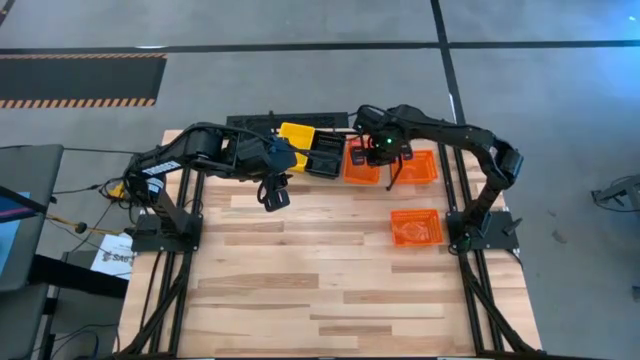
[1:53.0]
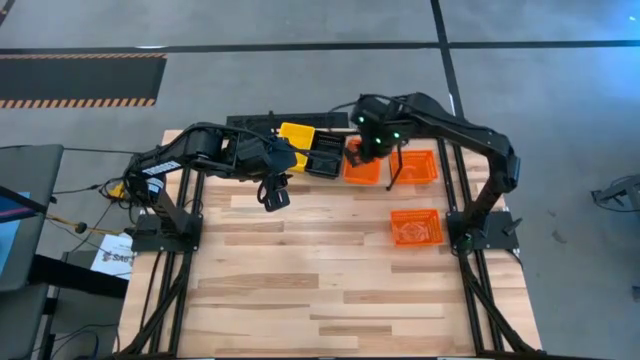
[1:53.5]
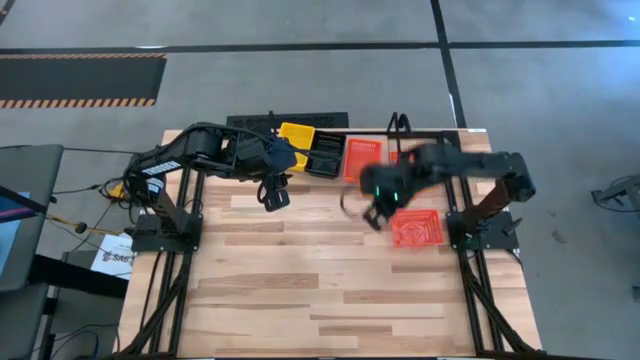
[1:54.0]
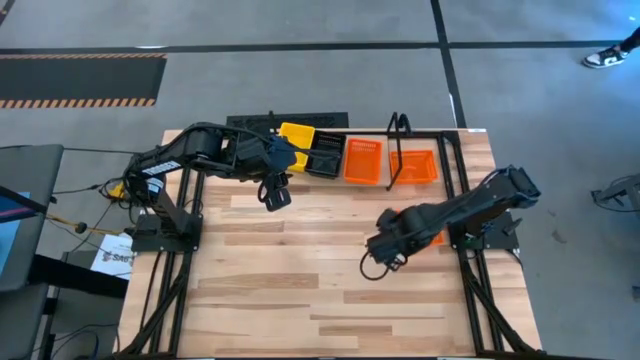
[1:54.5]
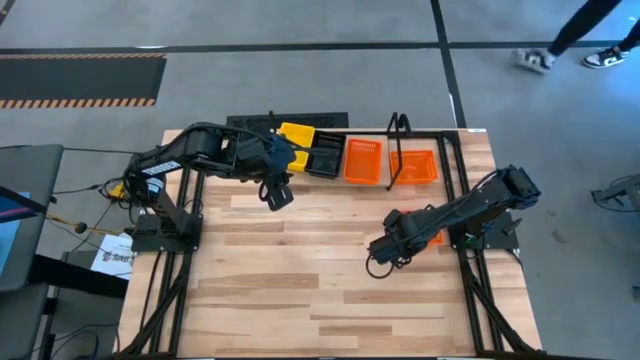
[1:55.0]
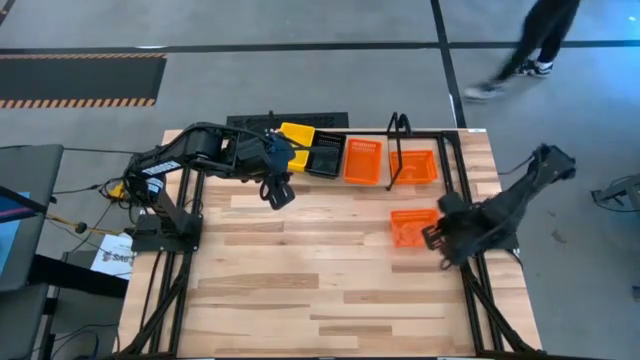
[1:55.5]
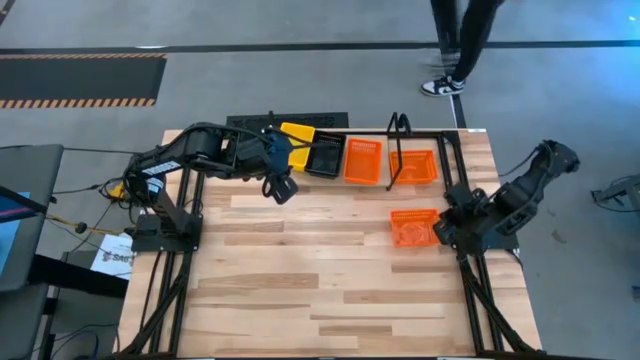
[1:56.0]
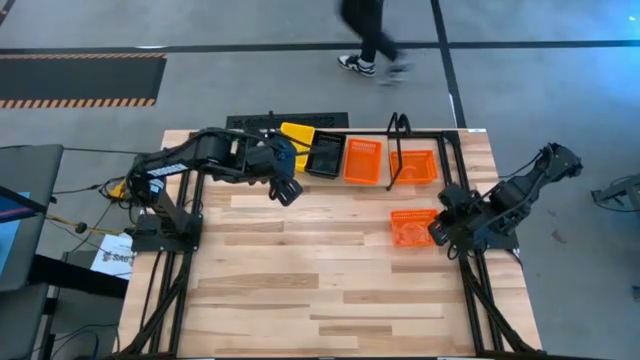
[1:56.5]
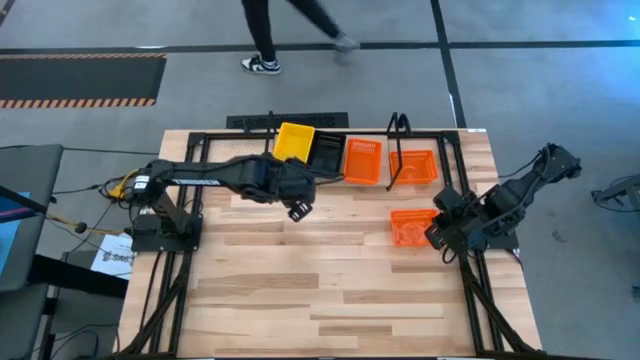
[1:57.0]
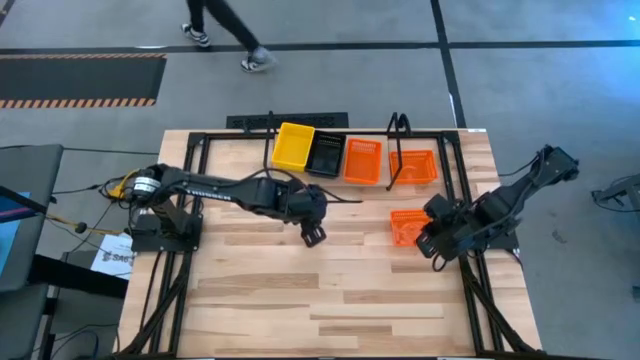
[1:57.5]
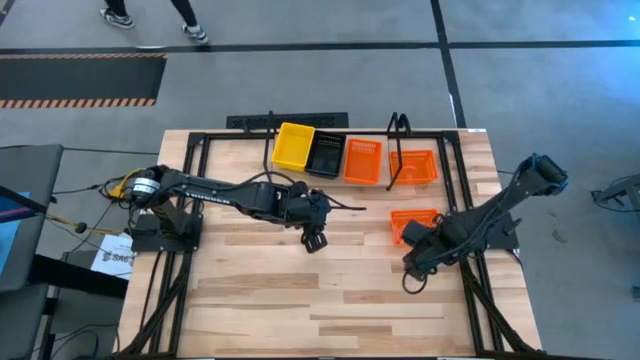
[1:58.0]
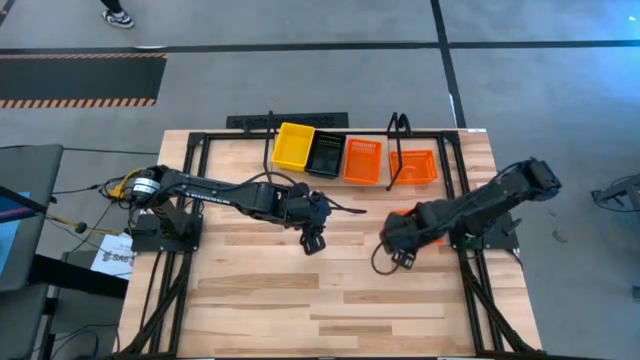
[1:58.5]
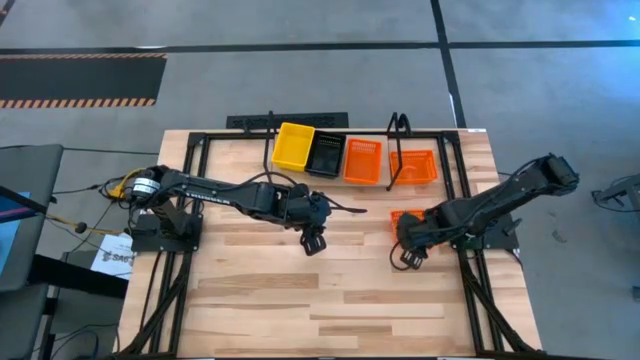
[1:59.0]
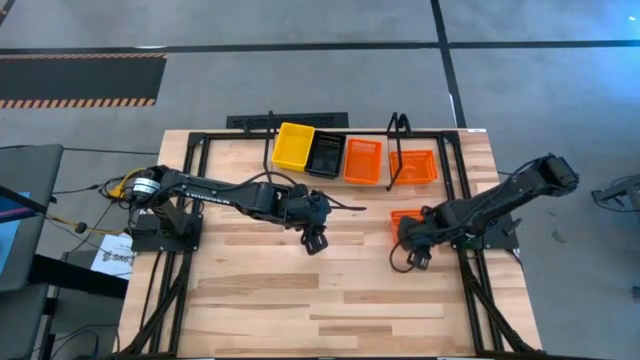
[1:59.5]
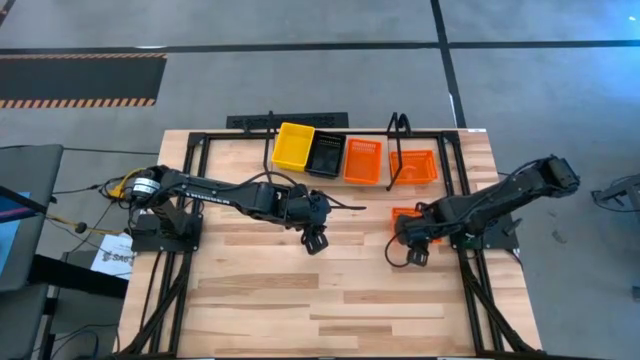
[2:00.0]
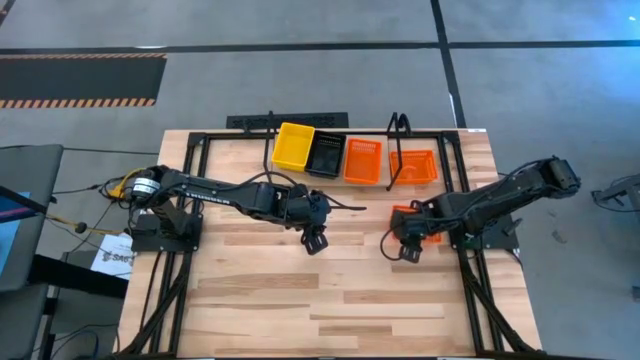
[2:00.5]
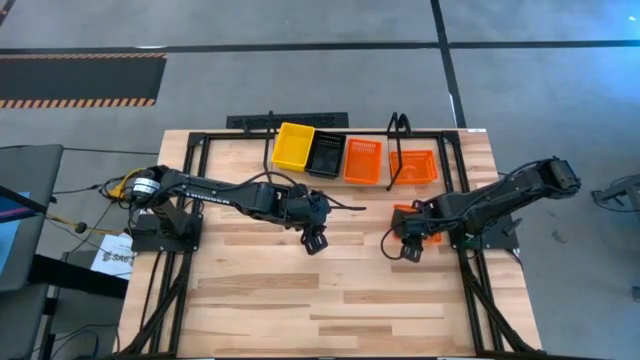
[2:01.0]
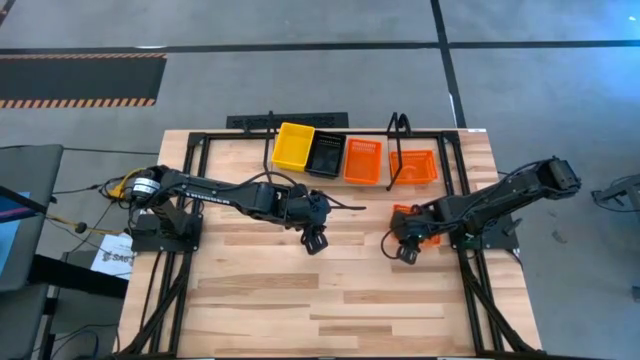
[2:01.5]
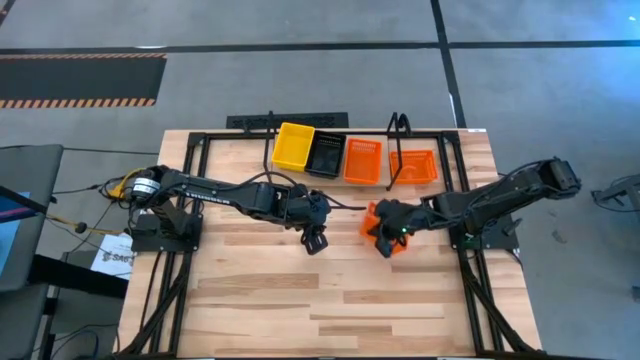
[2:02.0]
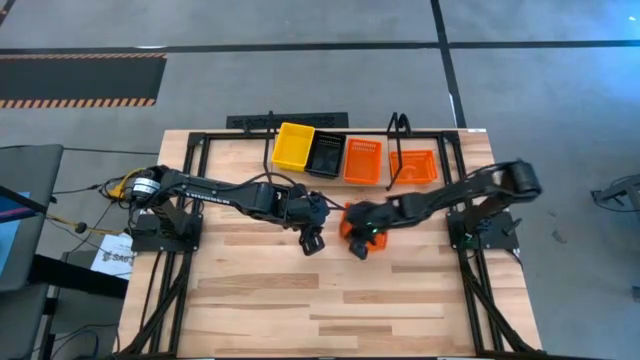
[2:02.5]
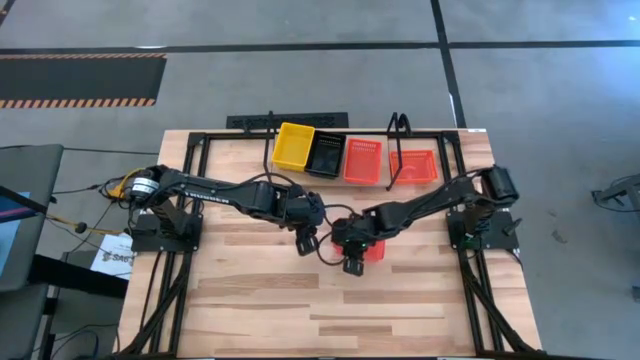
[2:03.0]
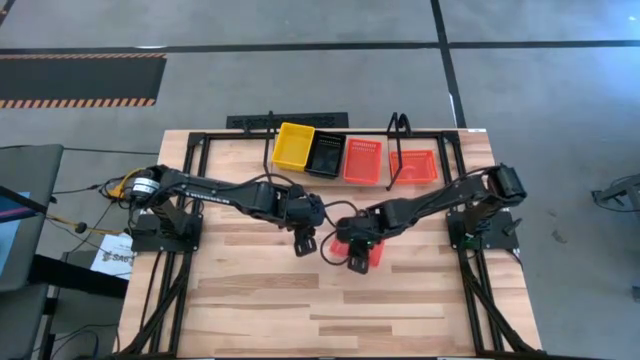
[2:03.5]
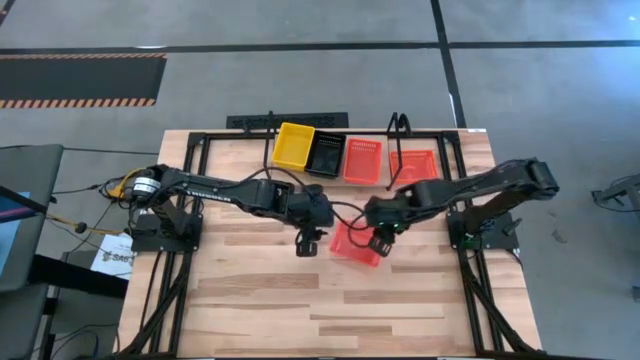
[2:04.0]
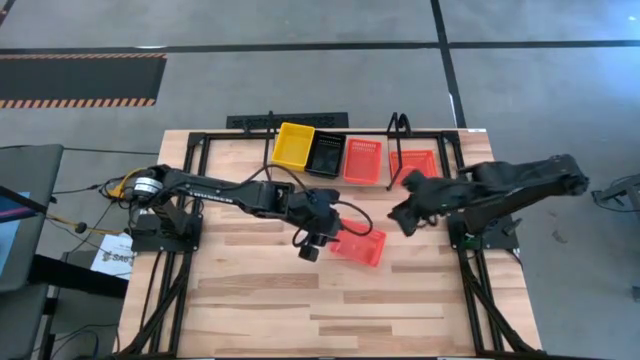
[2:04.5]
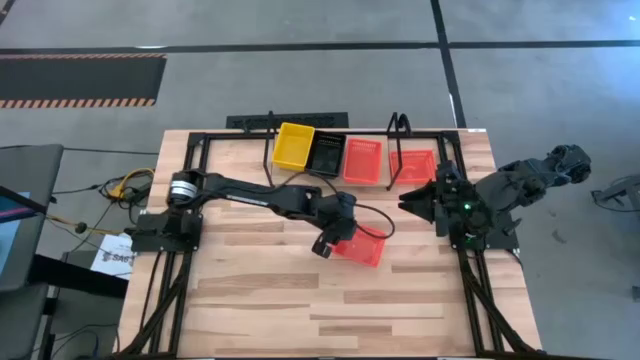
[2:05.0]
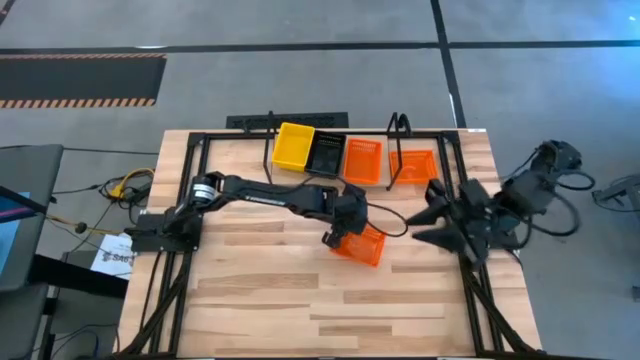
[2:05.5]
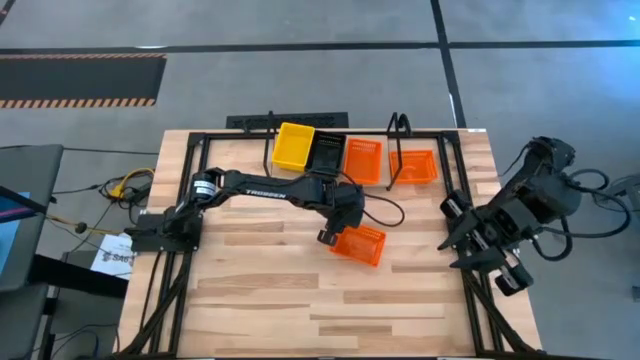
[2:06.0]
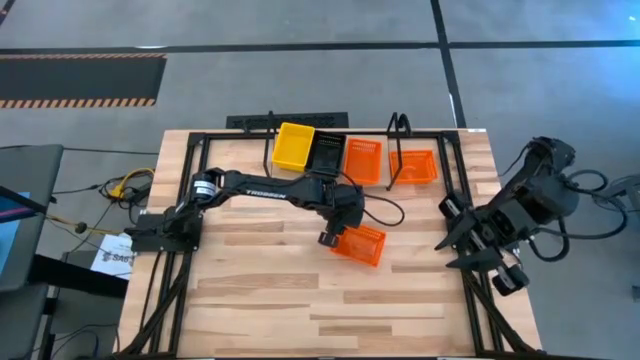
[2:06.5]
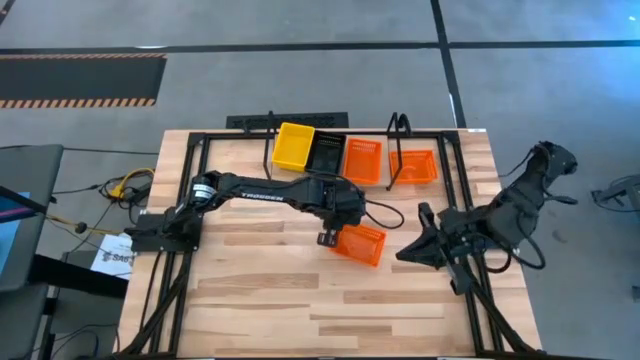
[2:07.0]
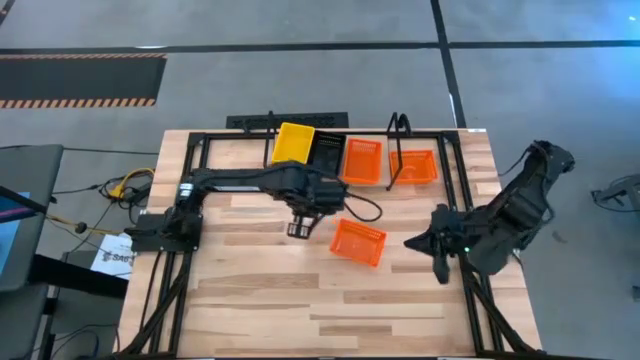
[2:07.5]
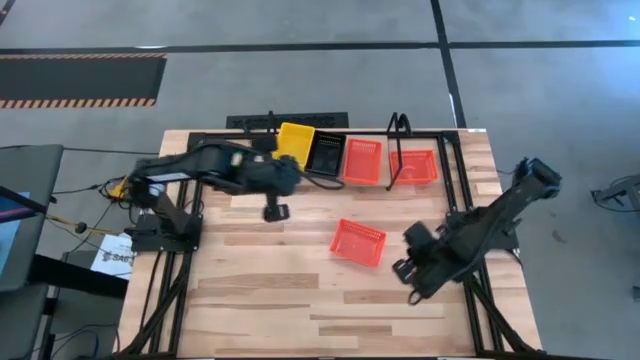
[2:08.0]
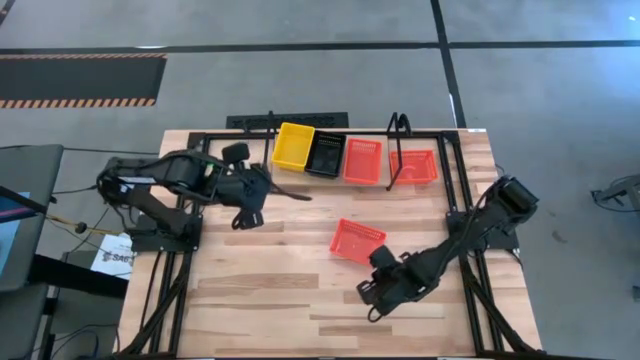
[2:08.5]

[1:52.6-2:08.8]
Task: Stack baskets on shelf by color
Stack the bottom orange bin on top of the other orange bin on the shelf

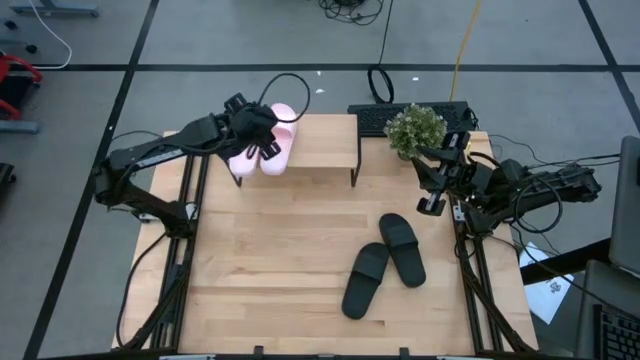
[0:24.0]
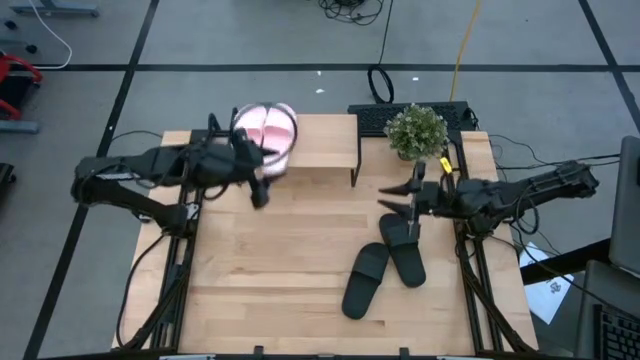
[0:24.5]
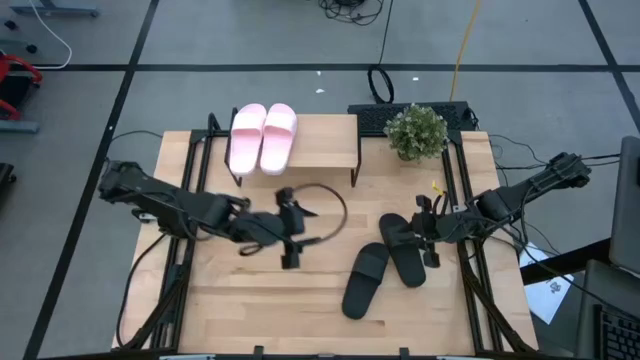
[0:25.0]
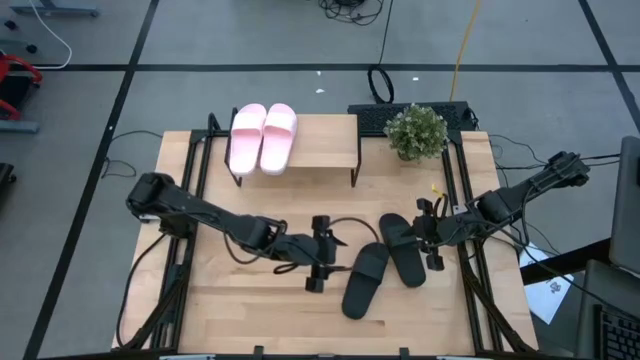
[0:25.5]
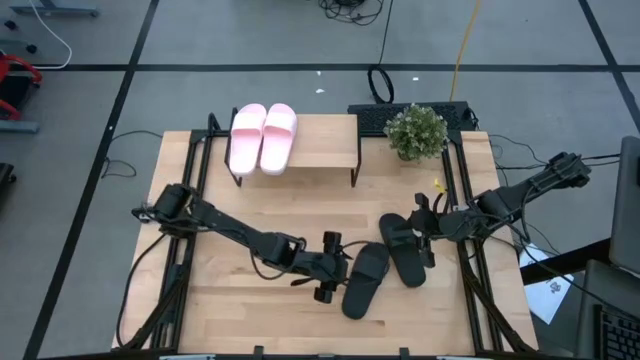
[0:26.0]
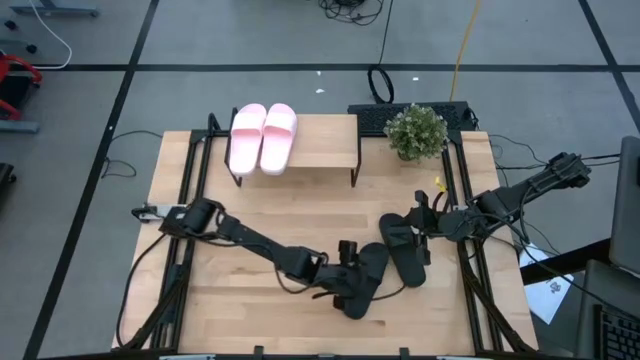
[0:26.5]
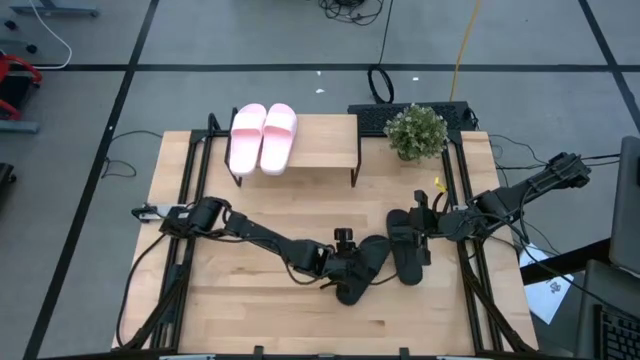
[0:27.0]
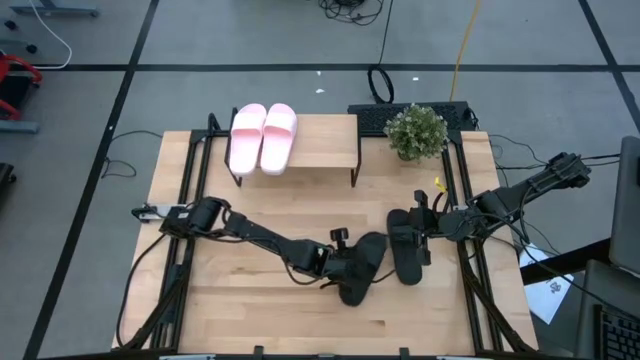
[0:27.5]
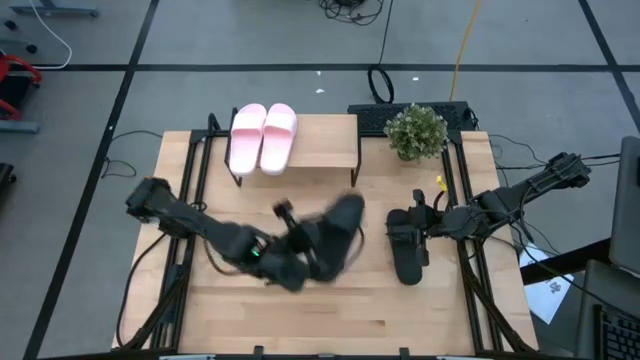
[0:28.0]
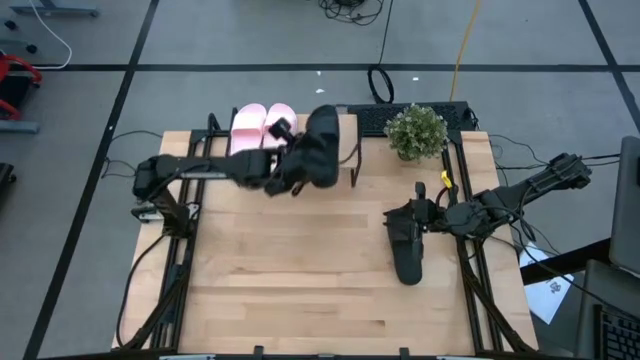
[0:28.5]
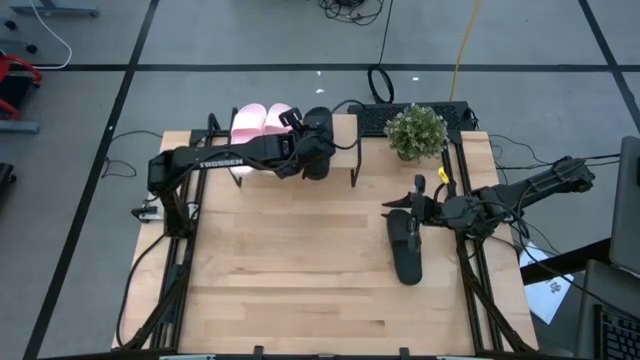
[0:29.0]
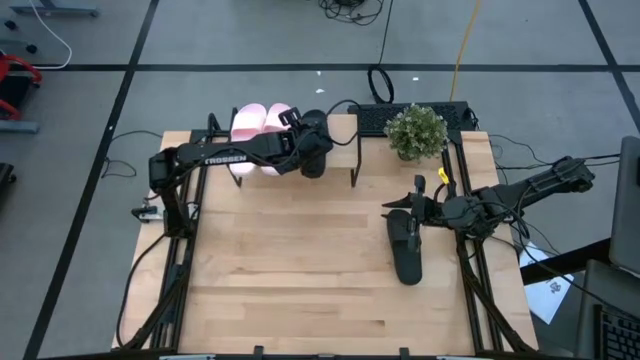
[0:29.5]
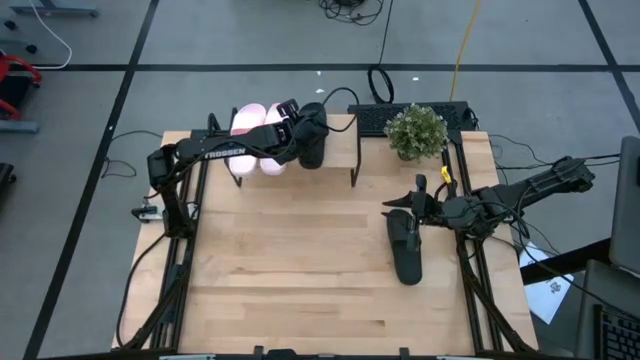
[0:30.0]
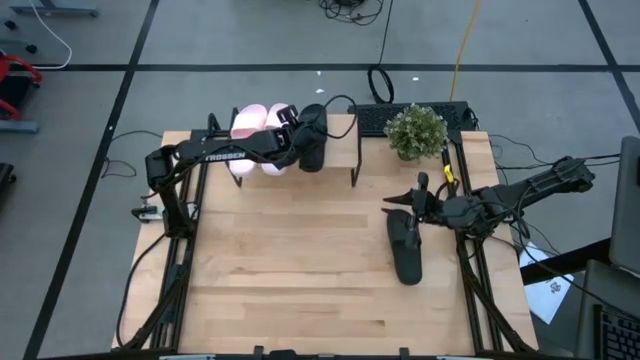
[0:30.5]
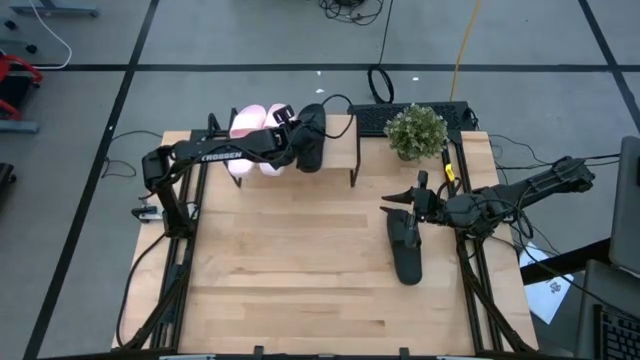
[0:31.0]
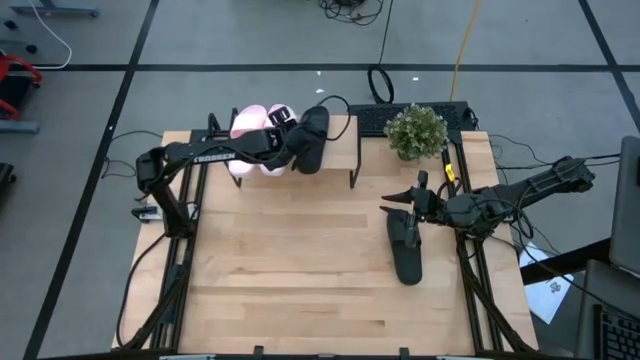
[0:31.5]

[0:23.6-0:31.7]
Task: Pick and place slides into the shelf
Put the left black slipper on the shelf
